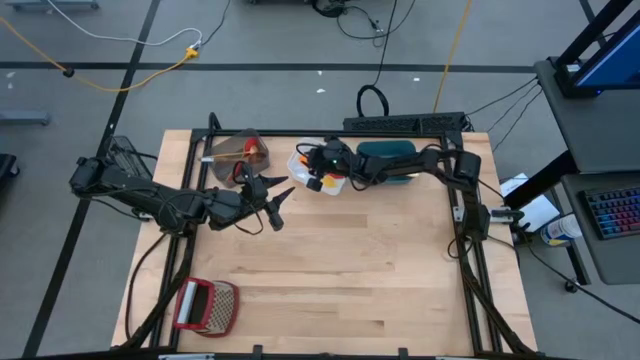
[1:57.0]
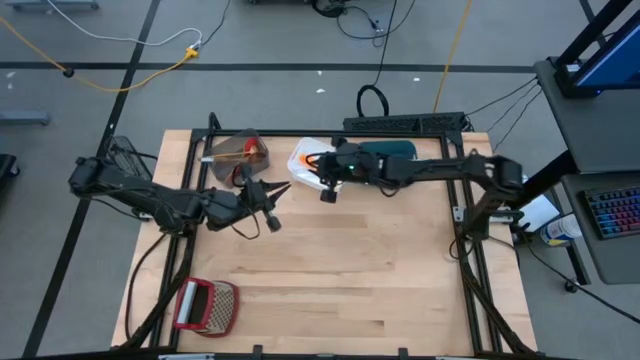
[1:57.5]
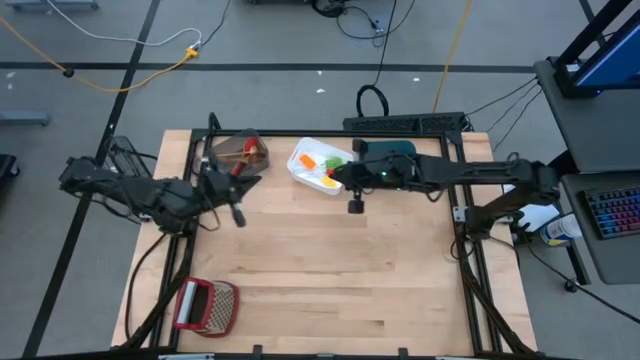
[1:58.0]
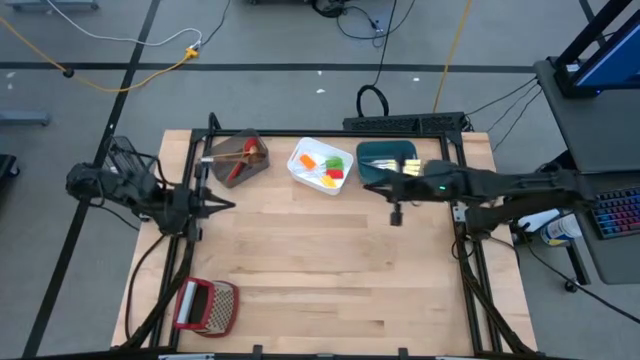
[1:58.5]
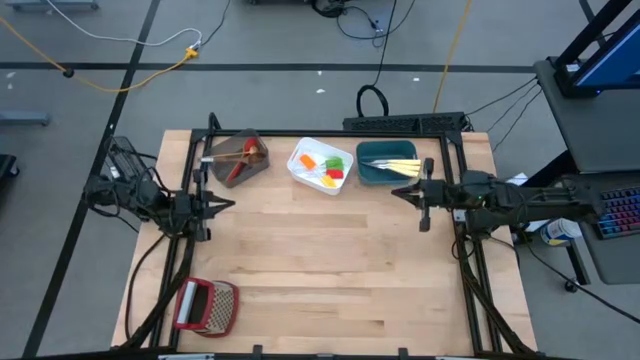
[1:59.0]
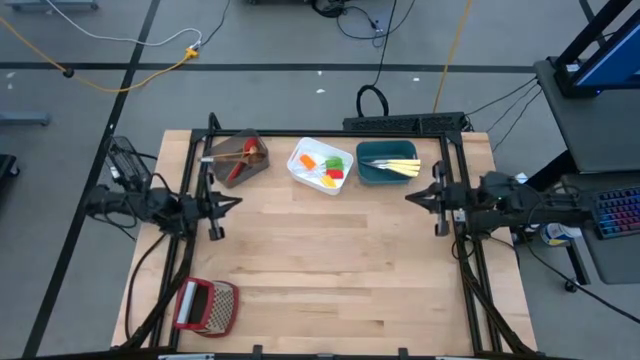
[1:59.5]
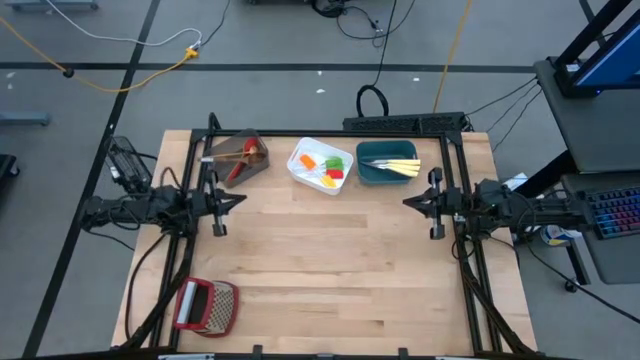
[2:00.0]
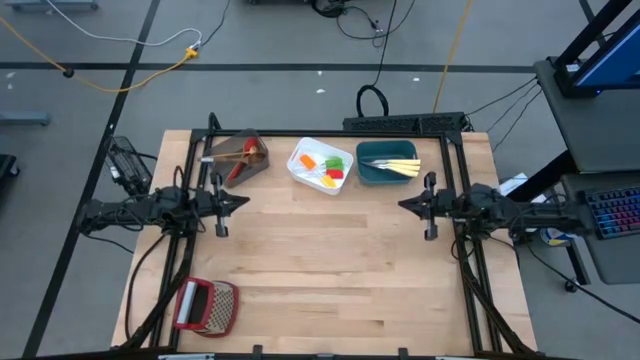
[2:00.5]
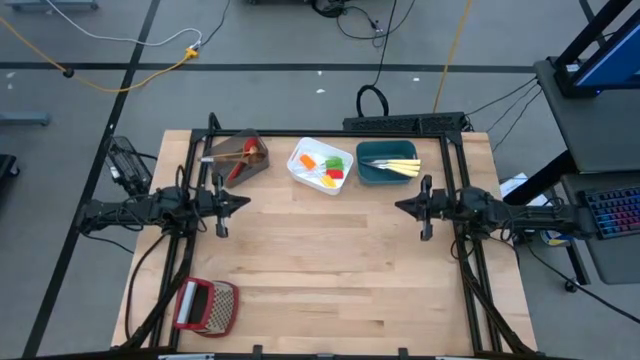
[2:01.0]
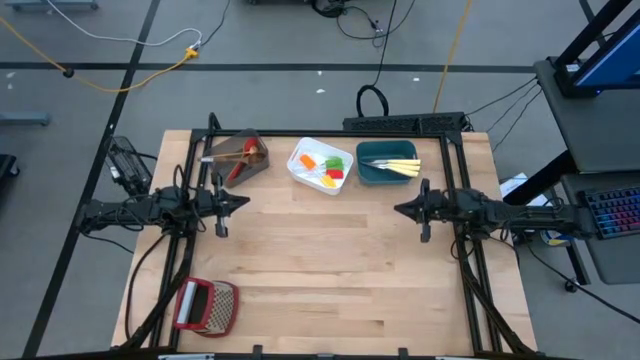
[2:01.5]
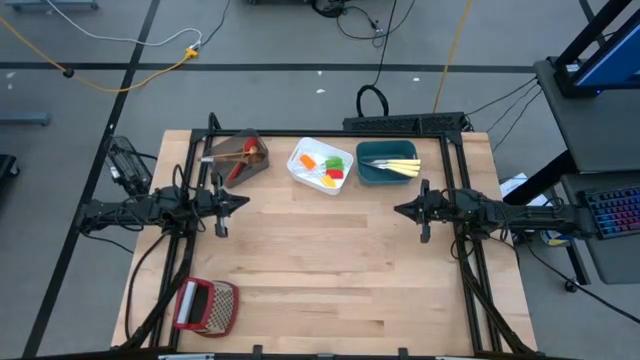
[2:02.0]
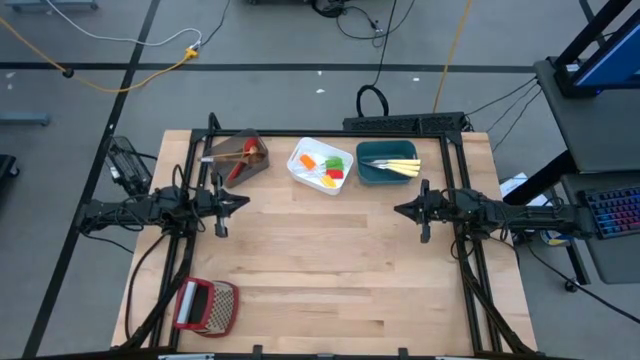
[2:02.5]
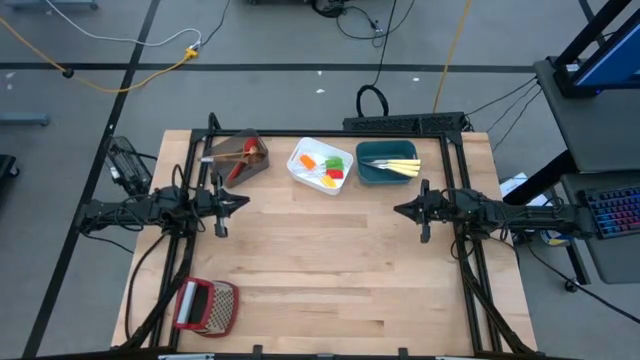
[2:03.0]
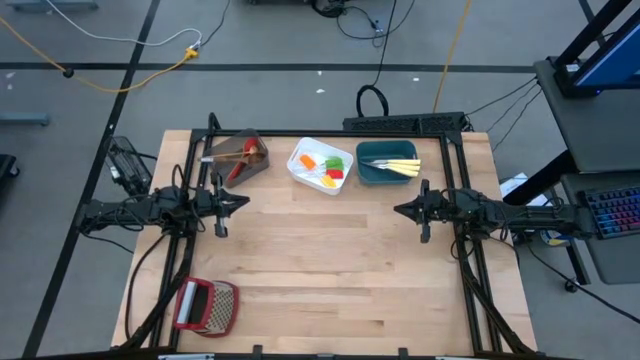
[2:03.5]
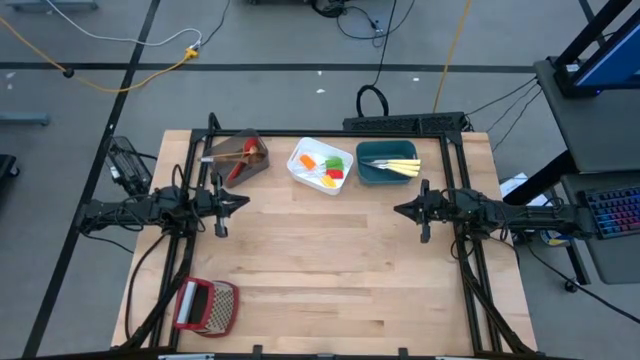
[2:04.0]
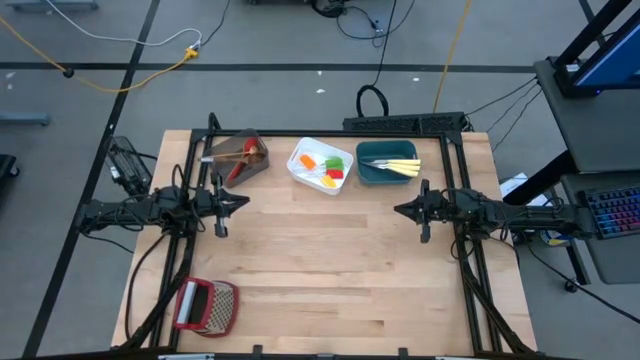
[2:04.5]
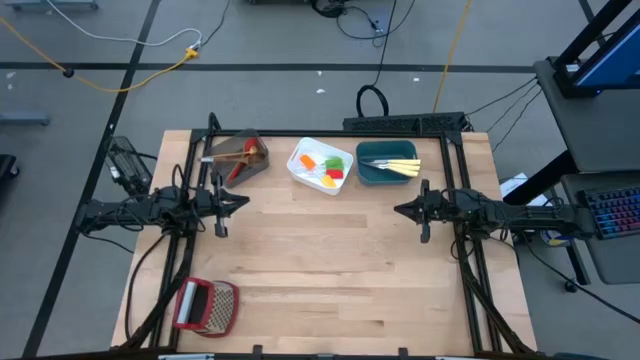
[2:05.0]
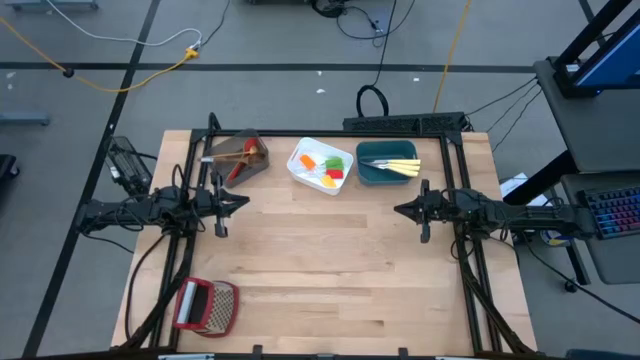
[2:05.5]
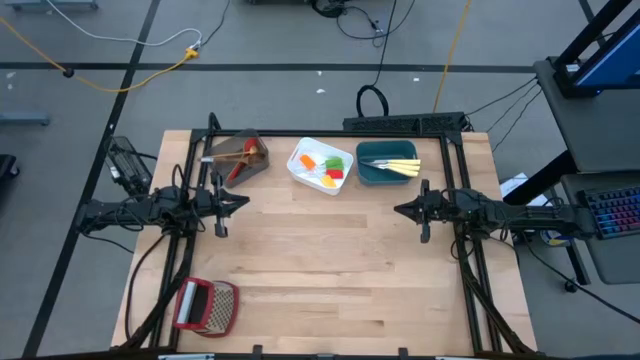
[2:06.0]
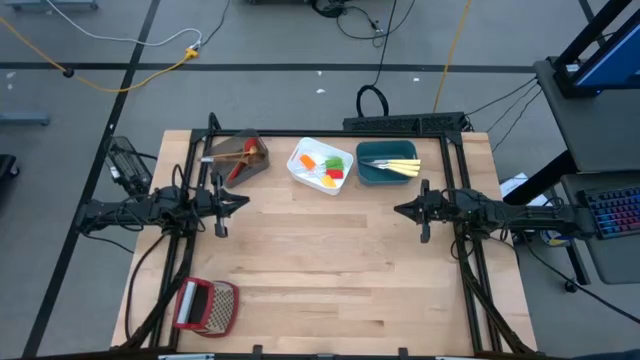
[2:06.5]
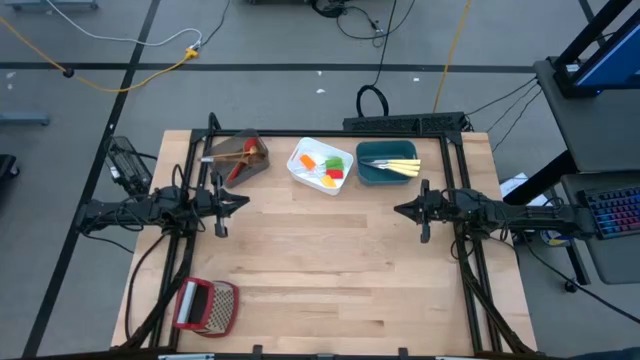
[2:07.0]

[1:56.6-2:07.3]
Task: Pick & Place Kitchen Items
Return to Home Position

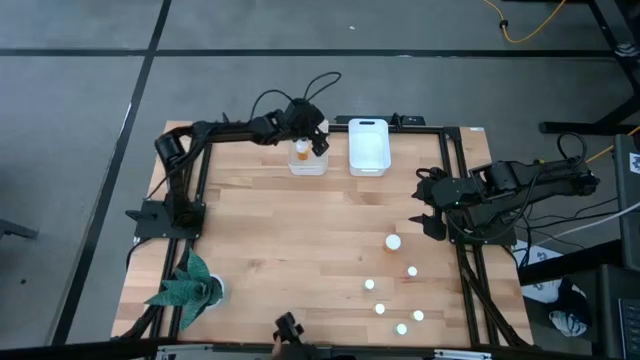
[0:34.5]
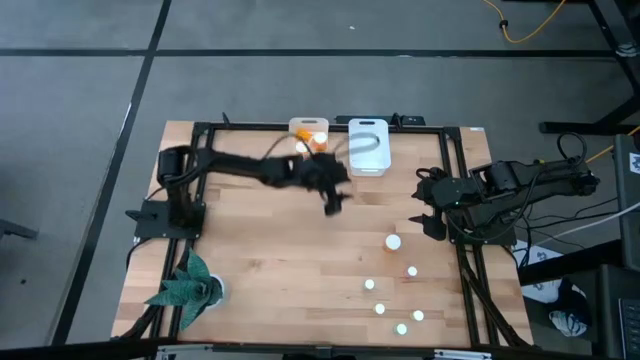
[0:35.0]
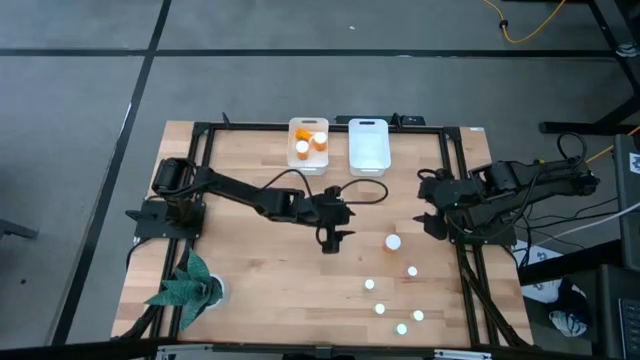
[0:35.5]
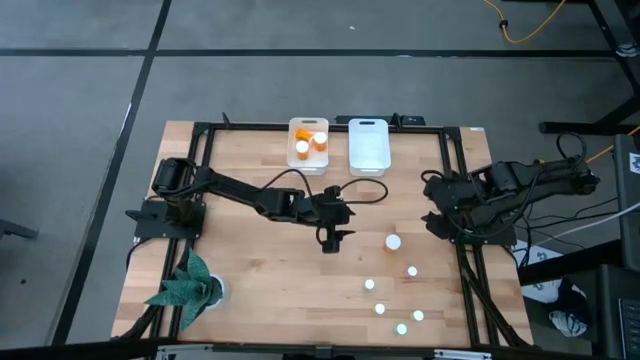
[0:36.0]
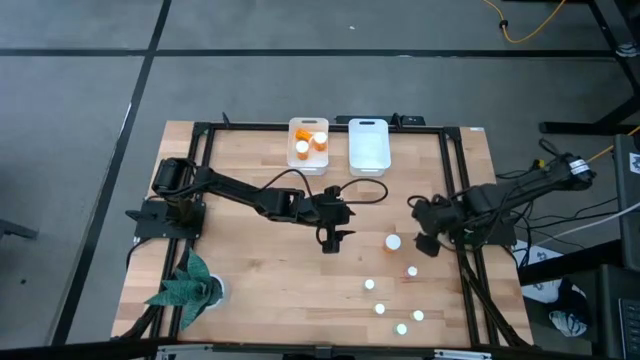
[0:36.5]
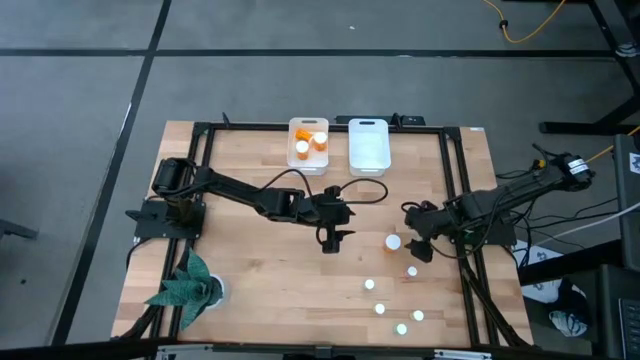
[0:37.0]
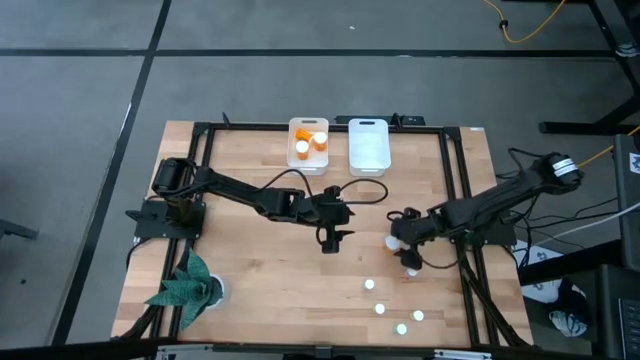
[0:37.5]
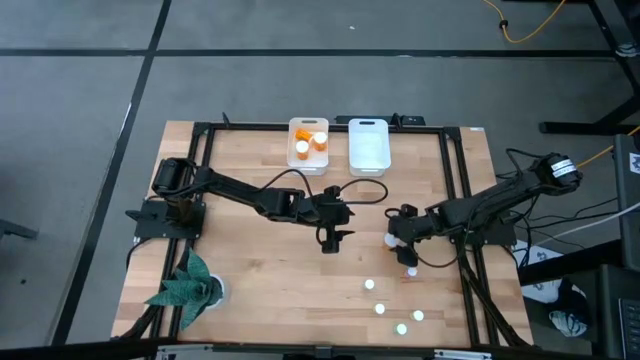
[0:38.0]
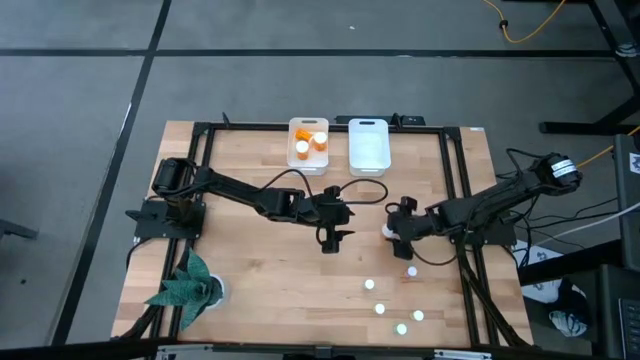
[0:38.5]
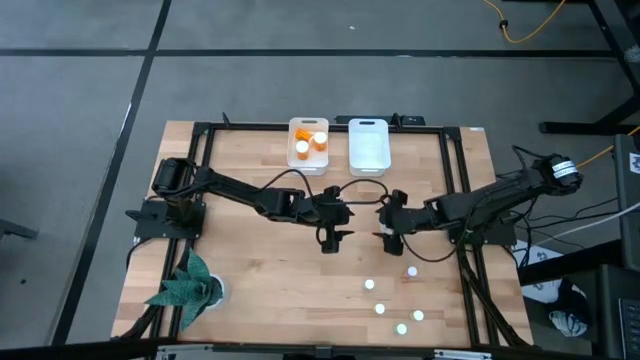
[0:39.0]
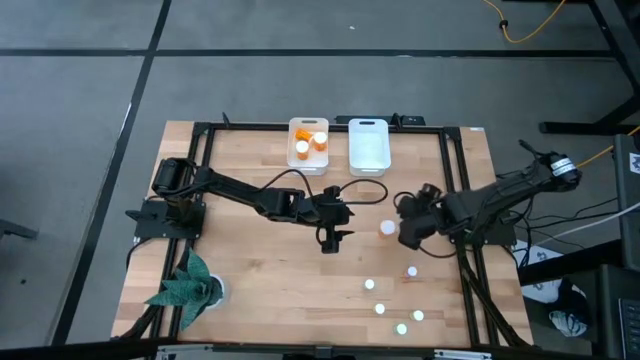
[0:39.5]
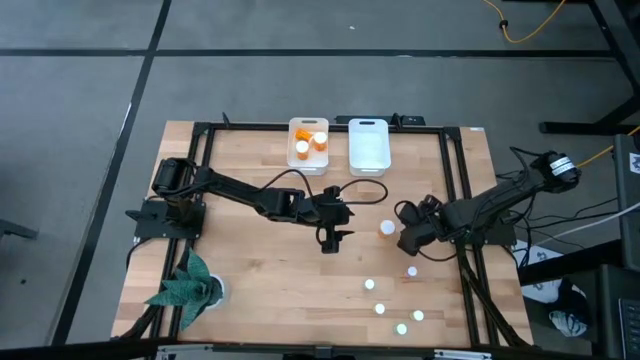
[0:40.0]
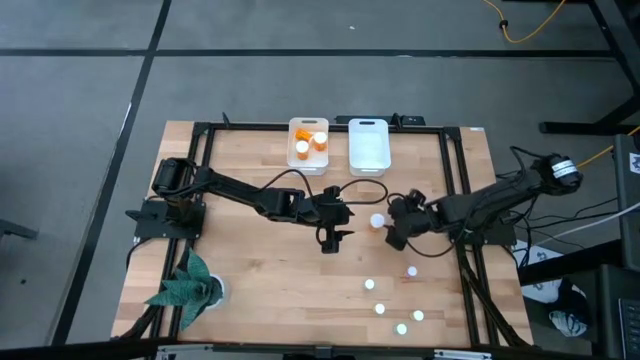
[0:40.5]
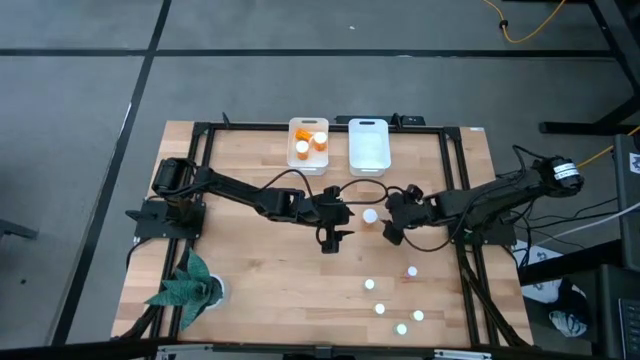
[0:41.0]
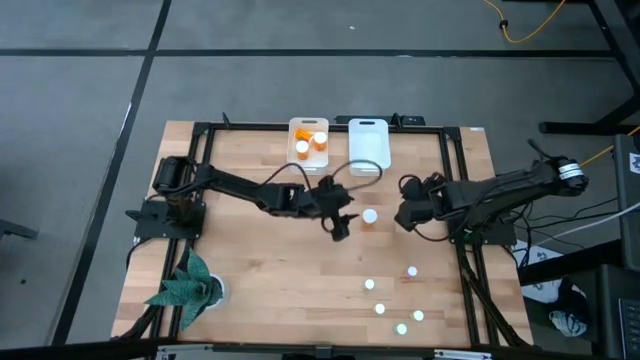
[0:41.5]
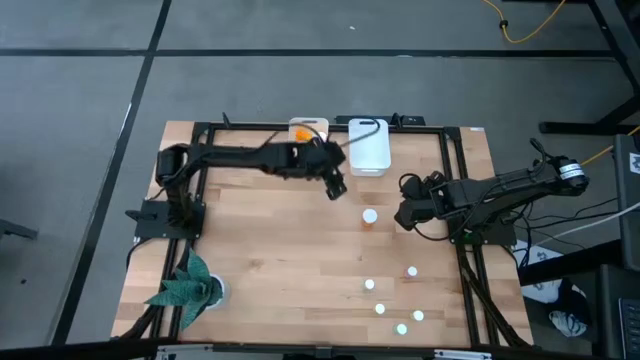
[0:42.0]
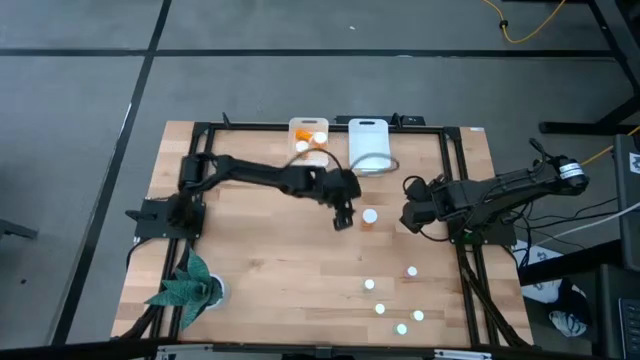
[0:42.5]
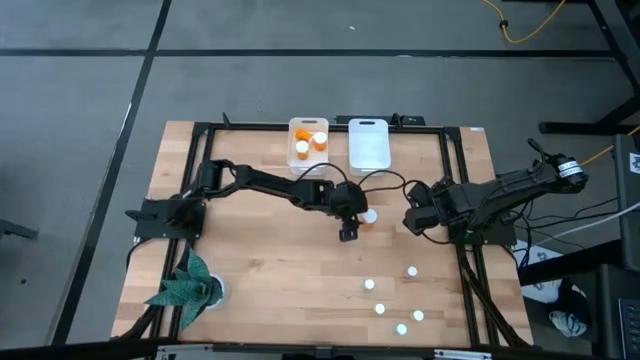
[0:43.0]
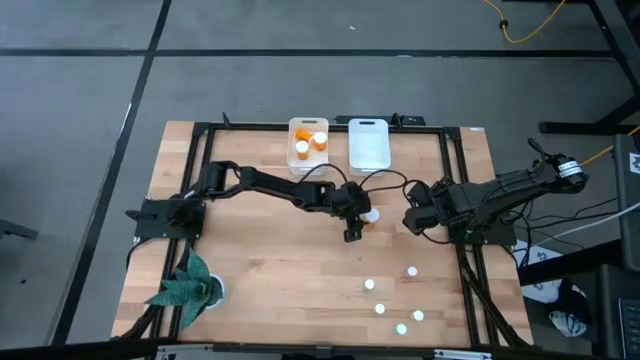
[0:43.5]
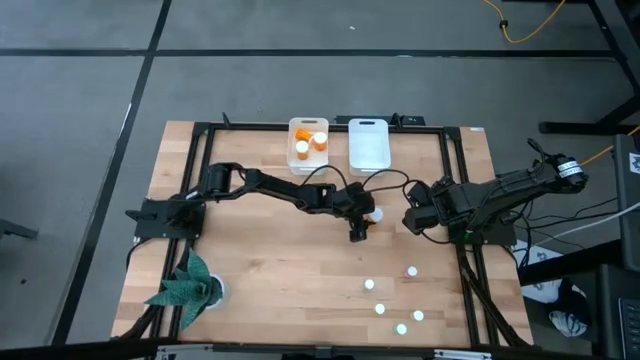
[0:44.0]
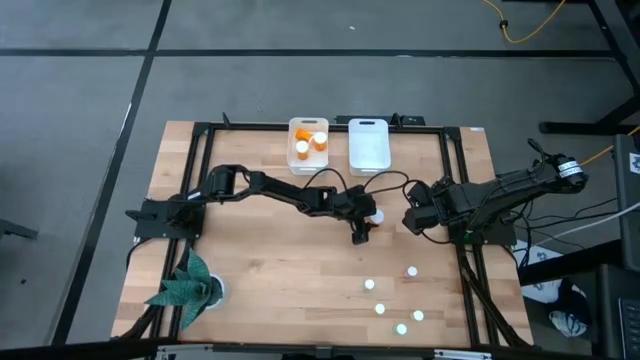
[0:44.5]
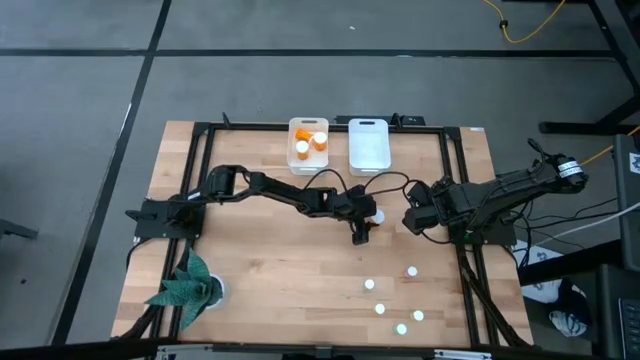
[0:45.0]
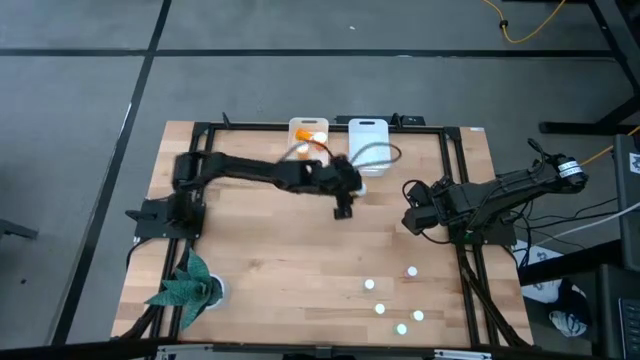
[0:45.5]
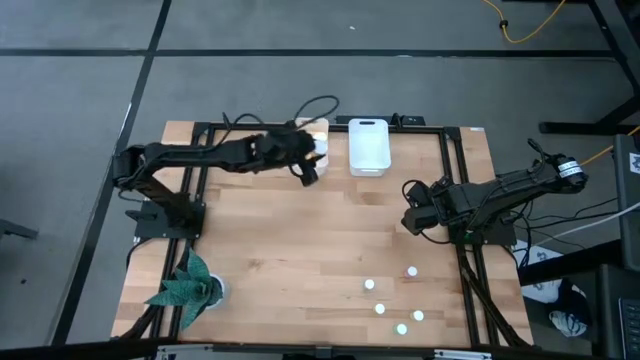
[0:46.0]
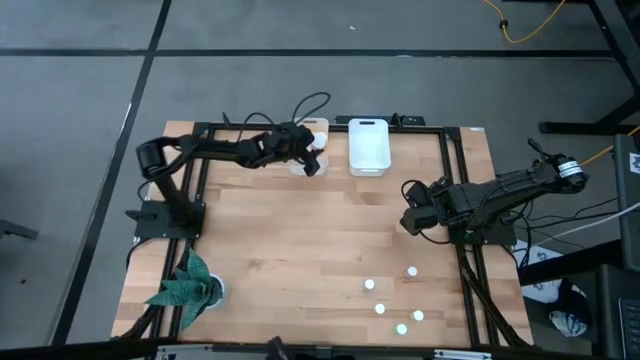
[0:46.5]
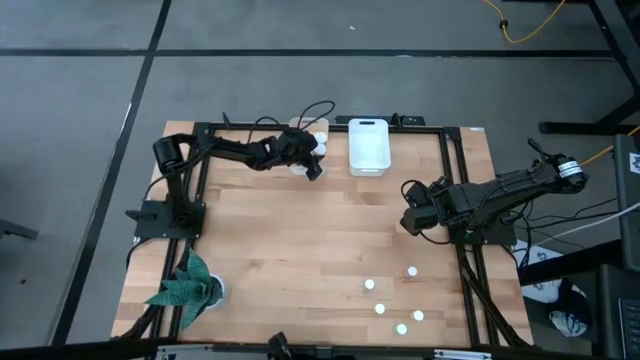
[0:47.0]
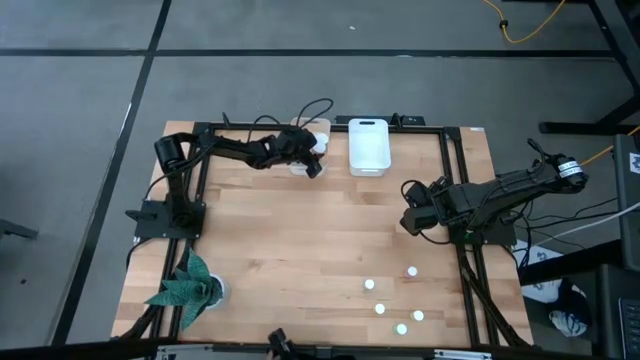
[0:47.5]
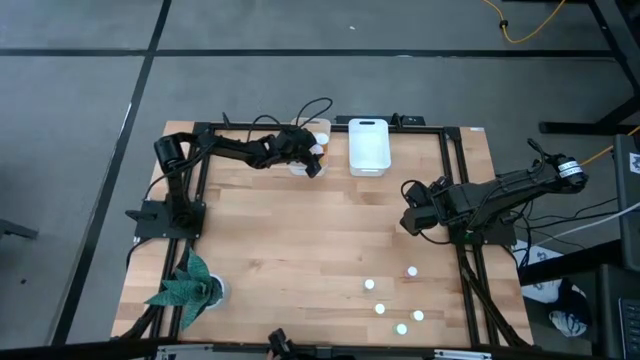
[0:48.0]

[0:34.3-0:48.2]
Task: Pick and place medicine bottles into bin by pill shape (circle, oval)
Put the orange capsule bottle into the left white bin
